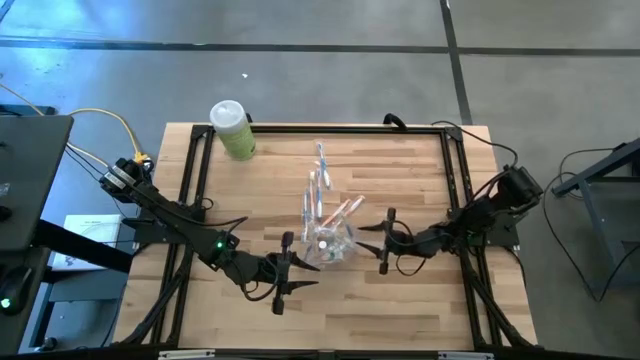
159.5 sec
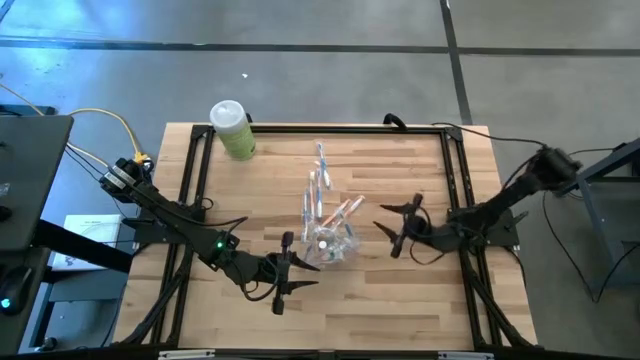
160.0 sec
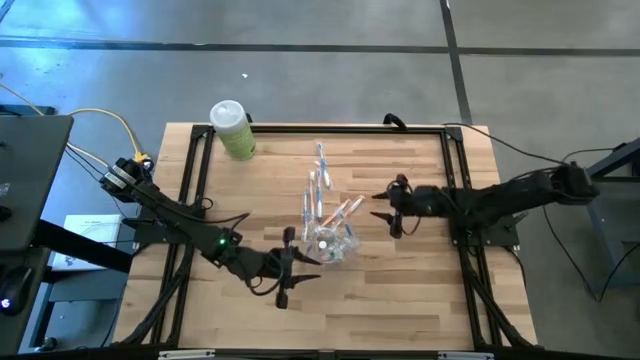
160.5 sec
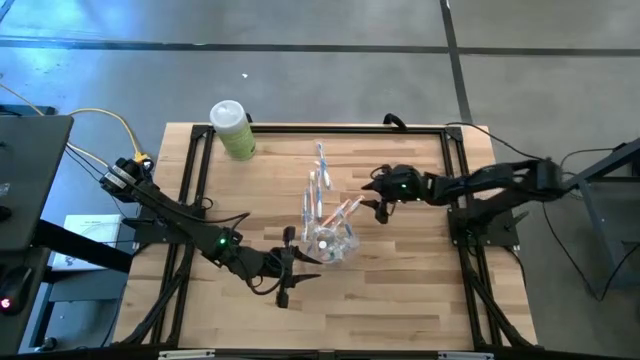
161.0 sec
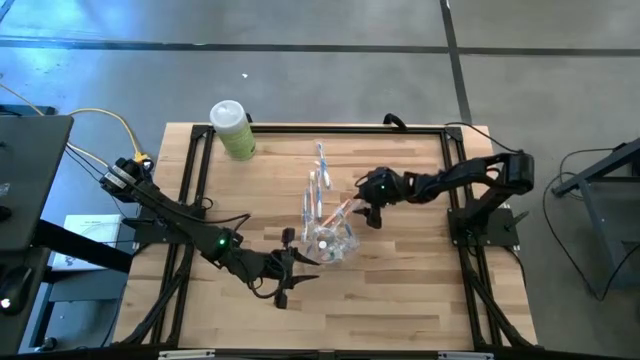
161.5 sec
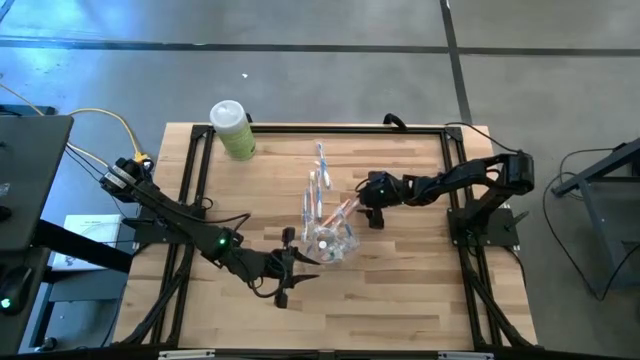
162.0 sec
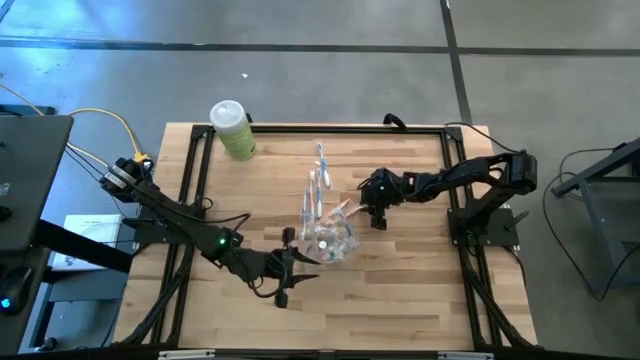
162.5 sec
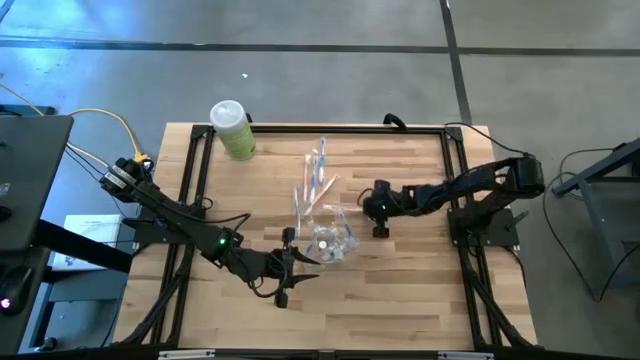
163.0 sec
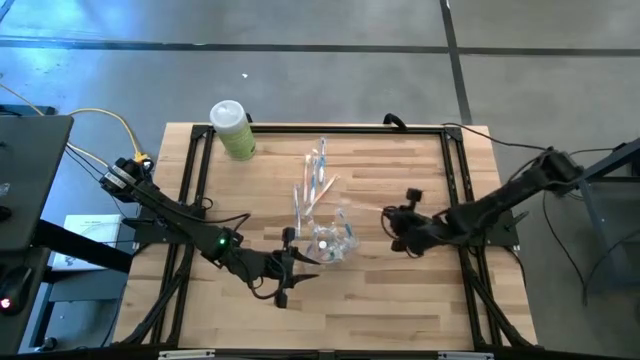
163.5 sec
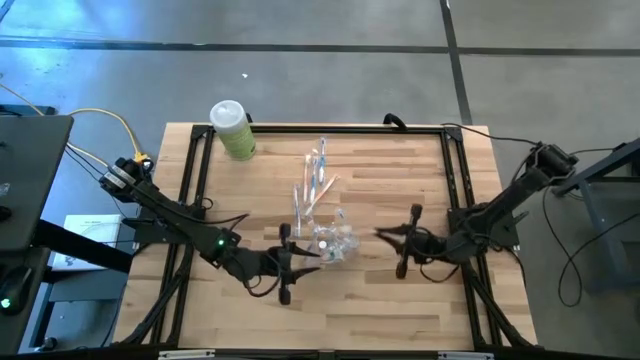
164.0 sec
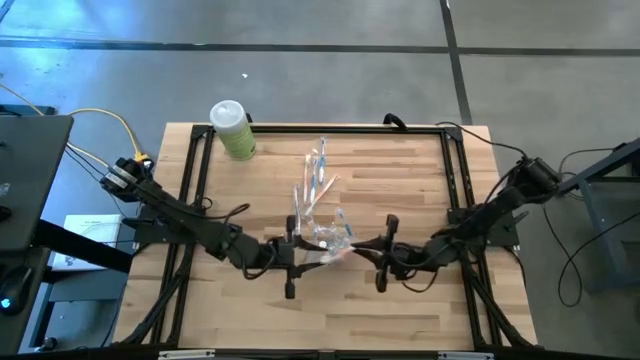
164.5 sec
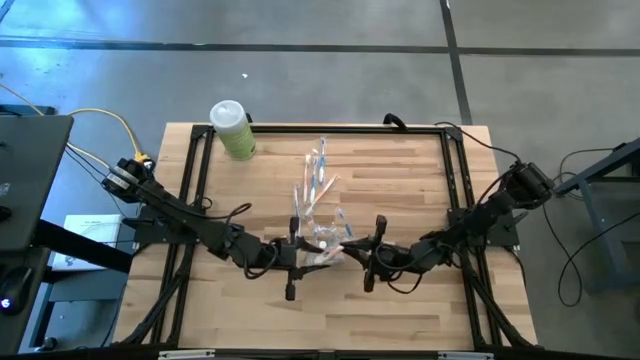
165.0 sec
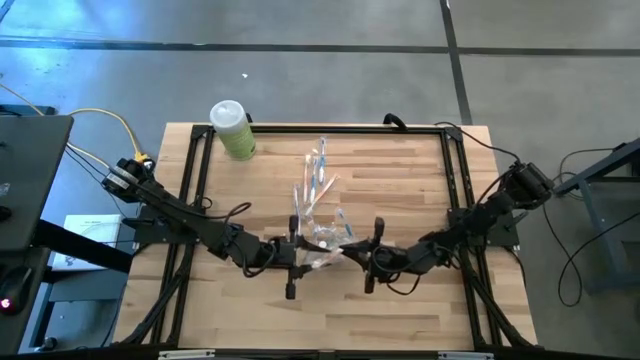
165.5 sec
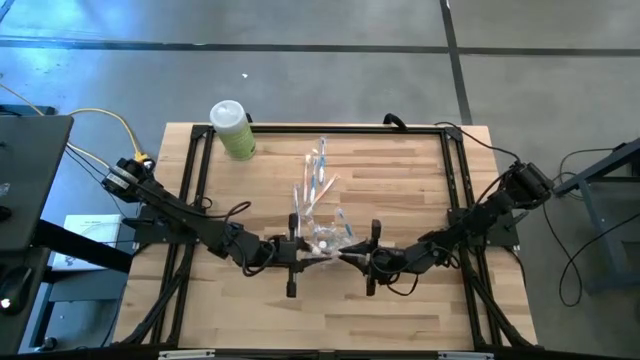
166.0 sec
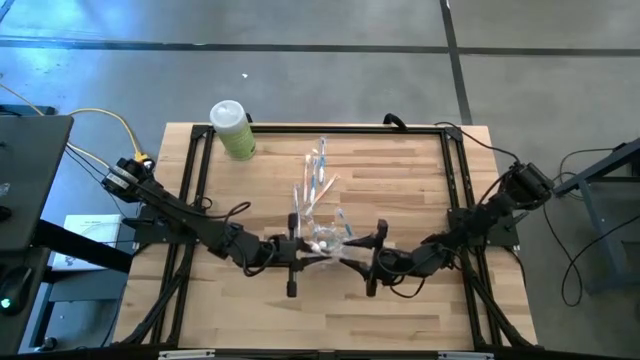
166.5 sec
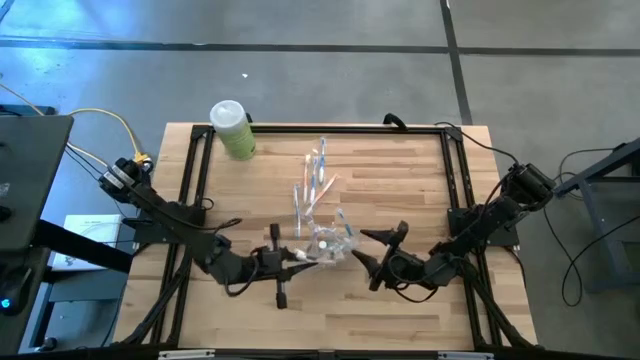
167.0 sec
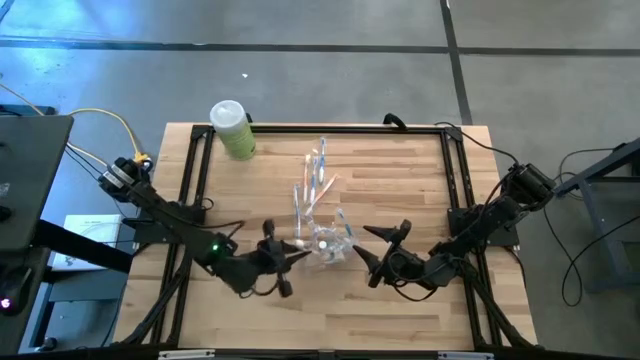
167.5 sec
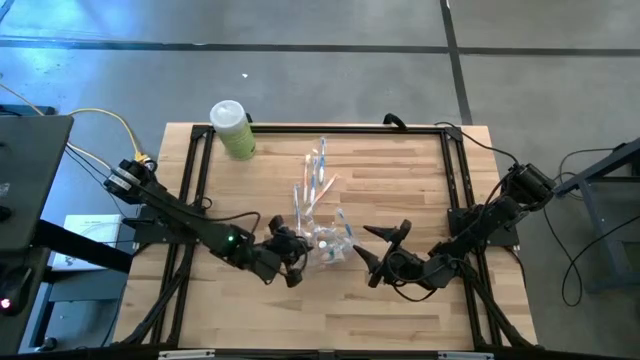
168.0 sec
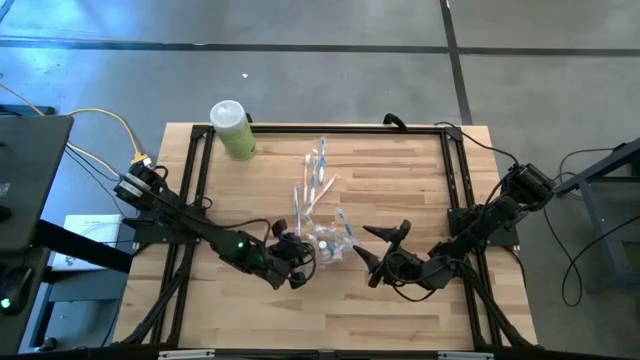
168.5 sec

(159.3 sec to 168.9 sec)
Task: Pick & Place toothbrushing station
Put the orange toothbrush into the transparent organizer

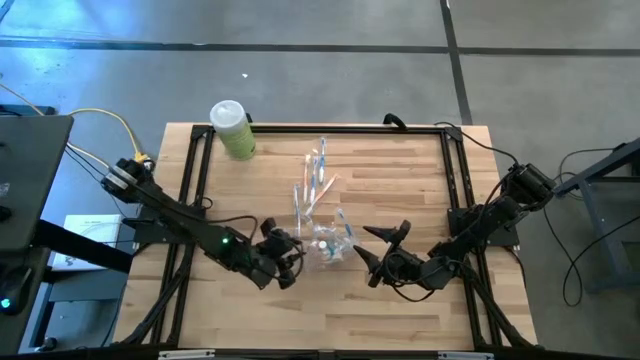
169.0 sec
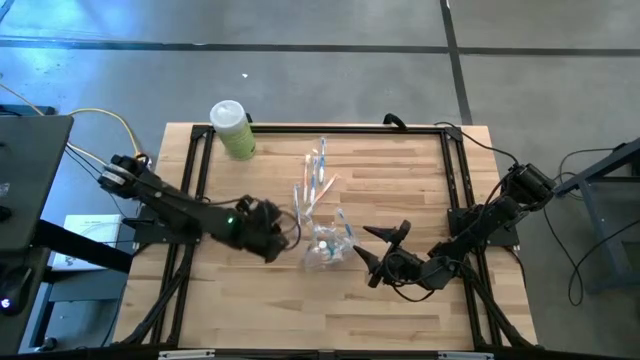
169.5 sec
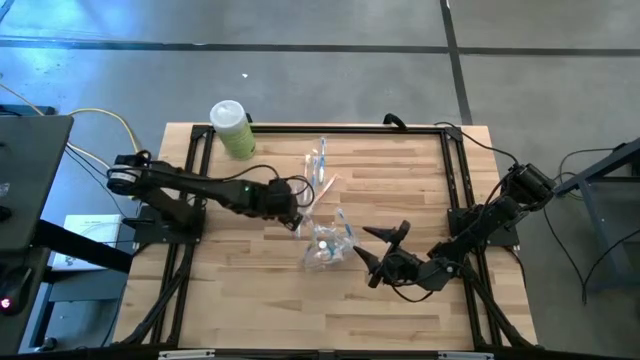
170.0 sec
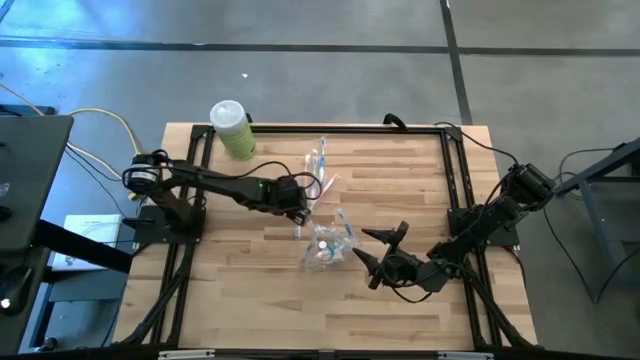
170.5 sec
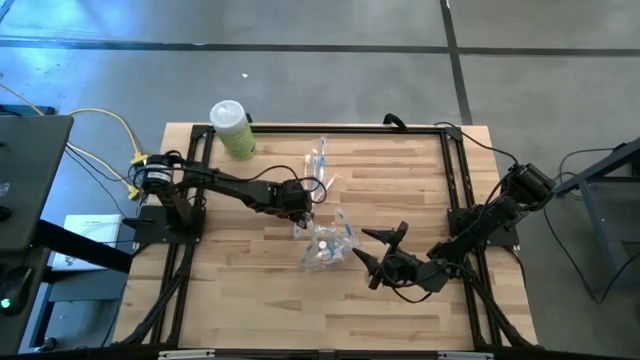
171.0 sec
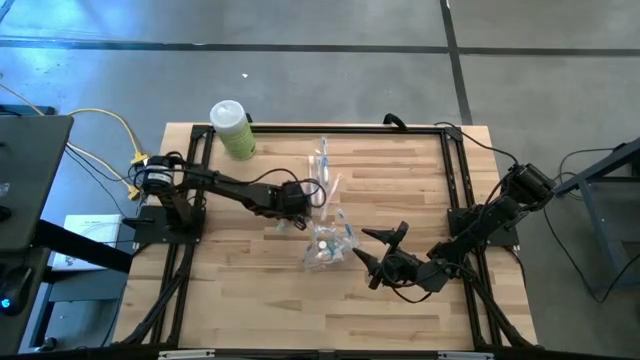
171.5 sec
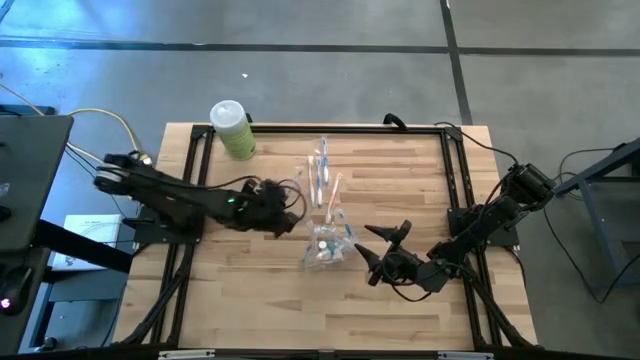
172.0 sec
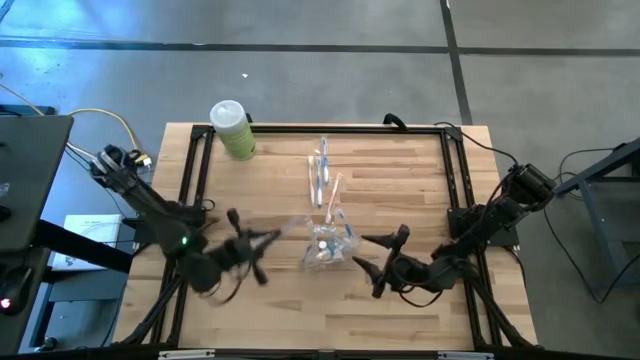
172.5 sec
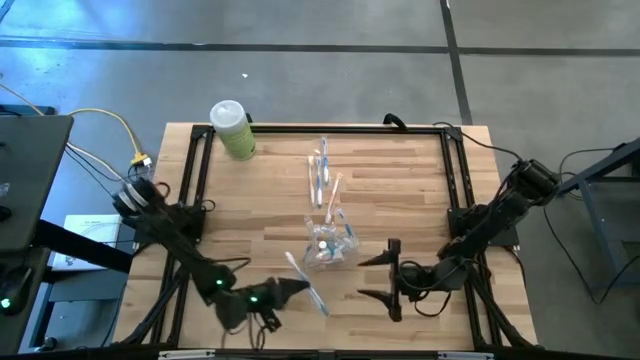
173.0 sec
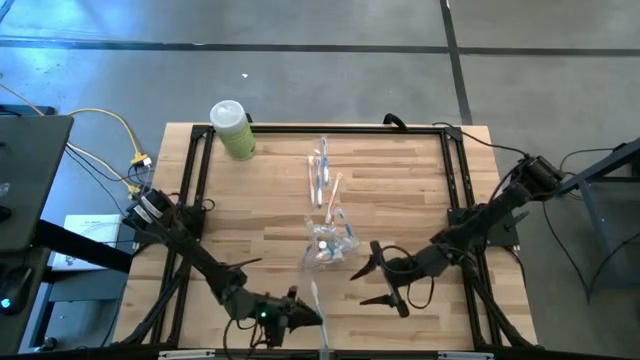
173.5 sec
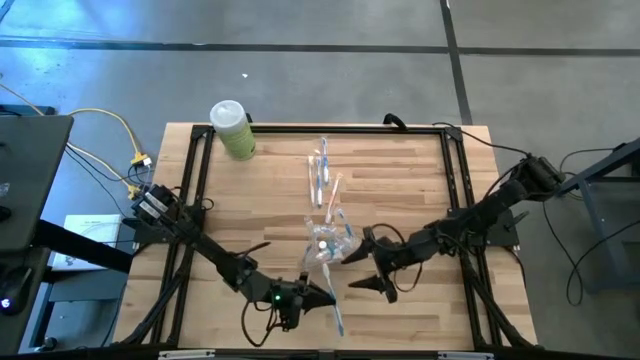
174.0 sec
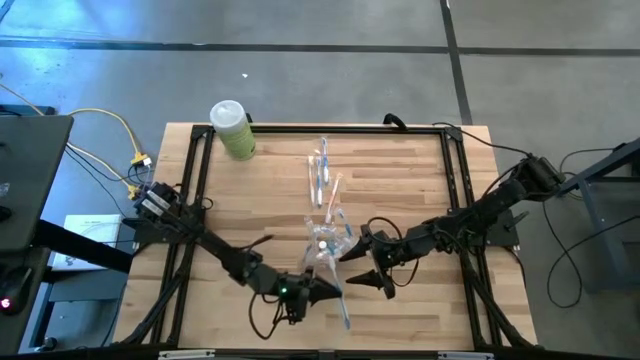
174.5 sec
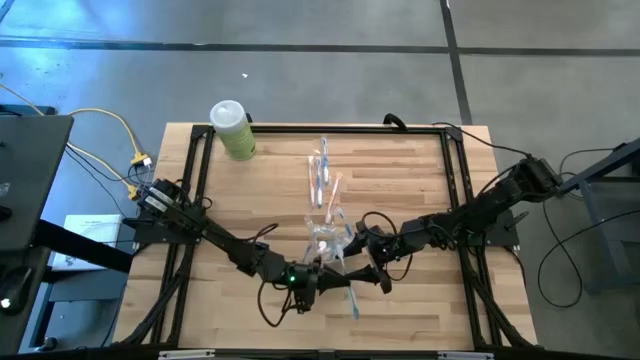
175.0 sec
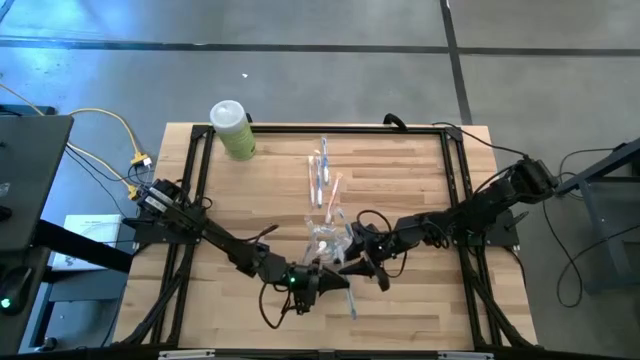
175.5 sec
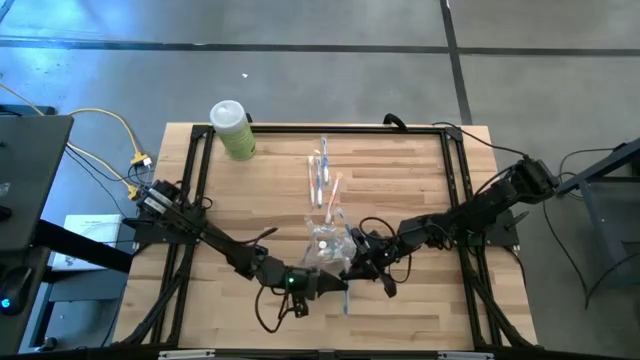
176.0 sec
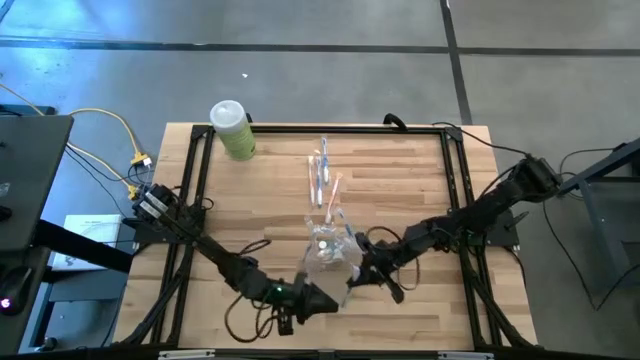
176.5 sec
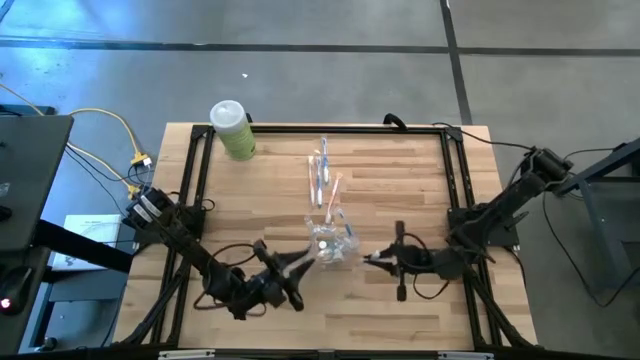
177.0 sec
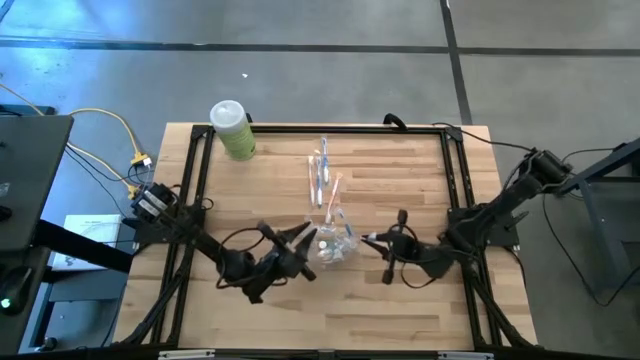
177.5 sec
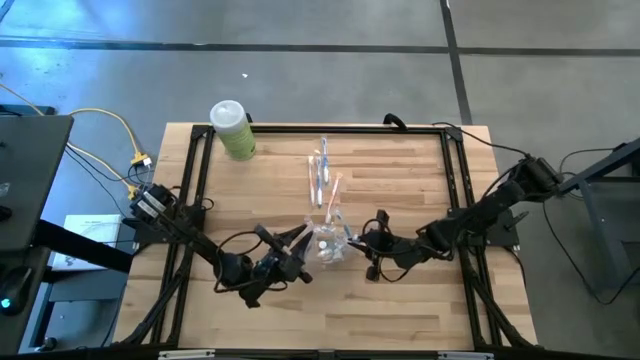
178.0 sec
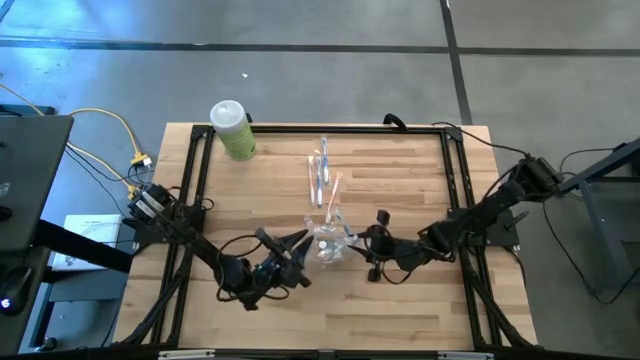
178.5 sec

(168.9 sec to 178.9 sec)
Put the blue toothbrush into the transparent organizer

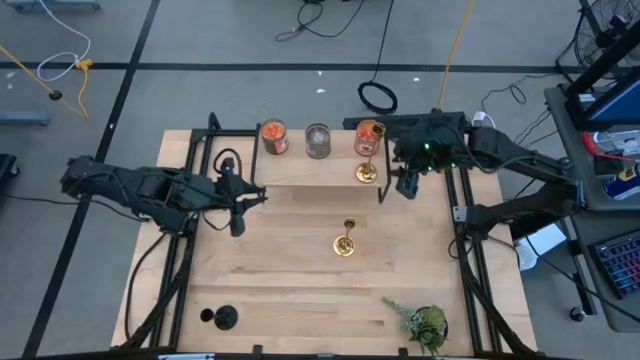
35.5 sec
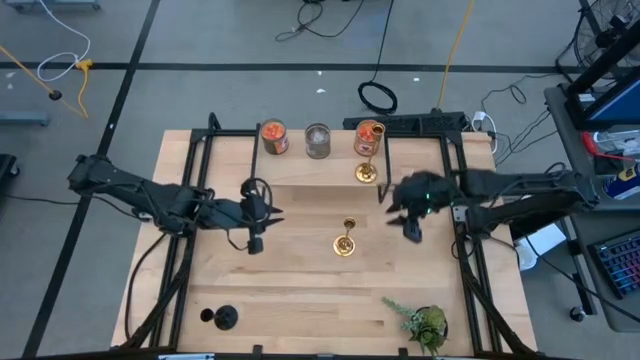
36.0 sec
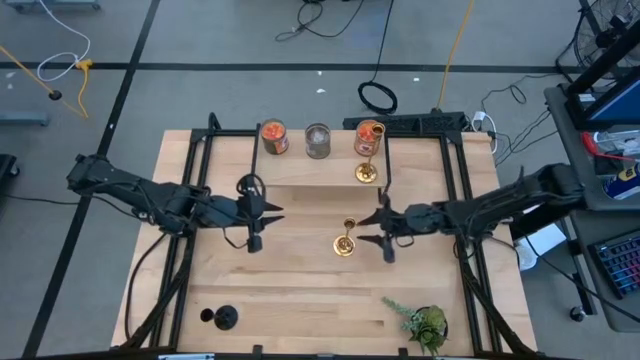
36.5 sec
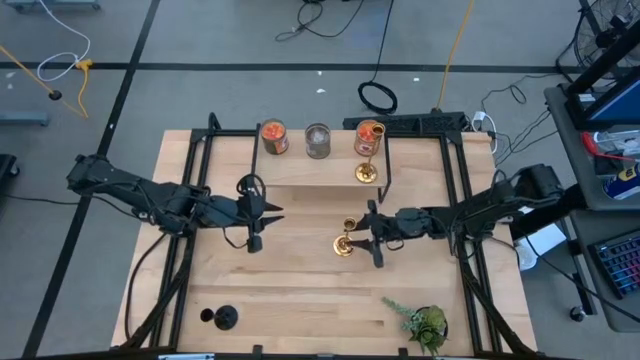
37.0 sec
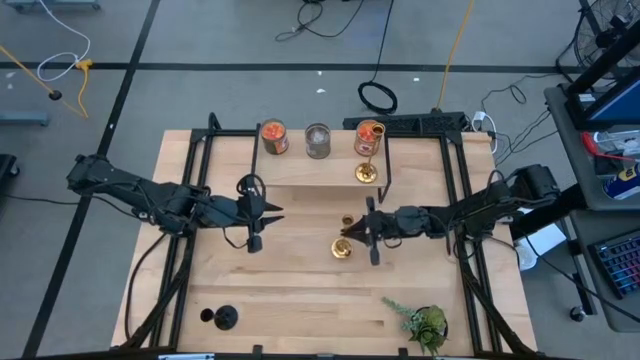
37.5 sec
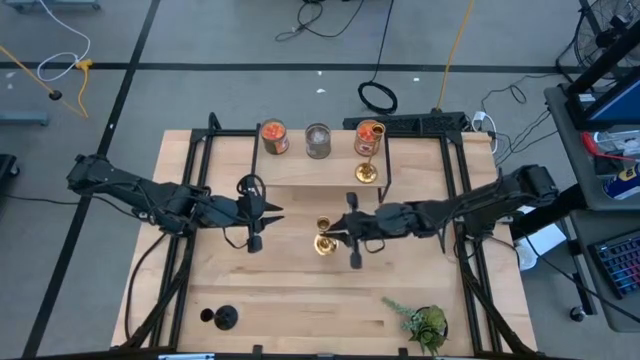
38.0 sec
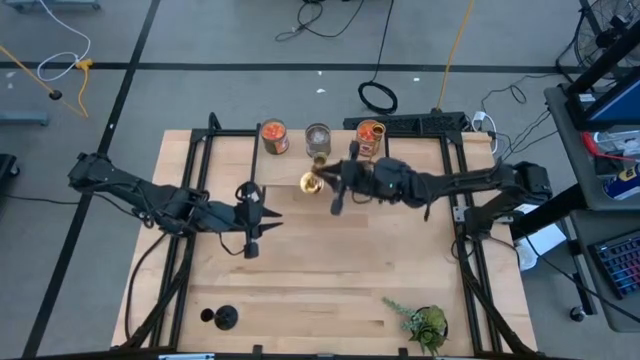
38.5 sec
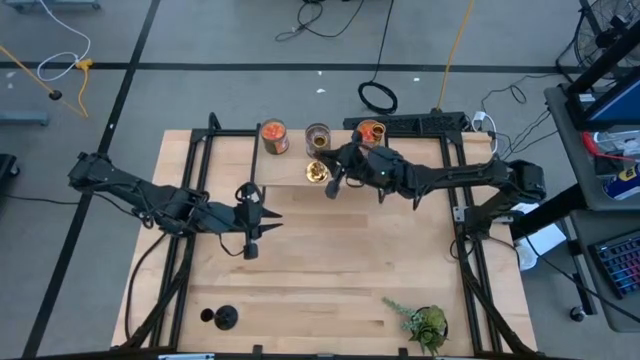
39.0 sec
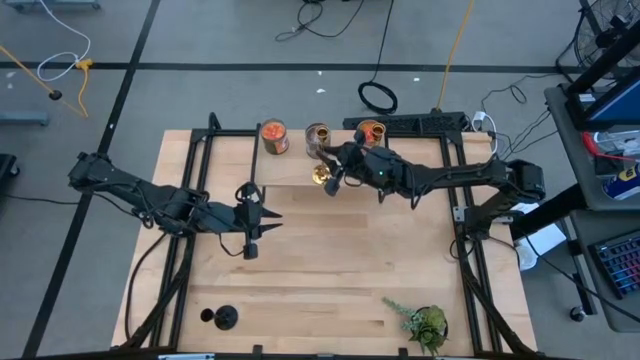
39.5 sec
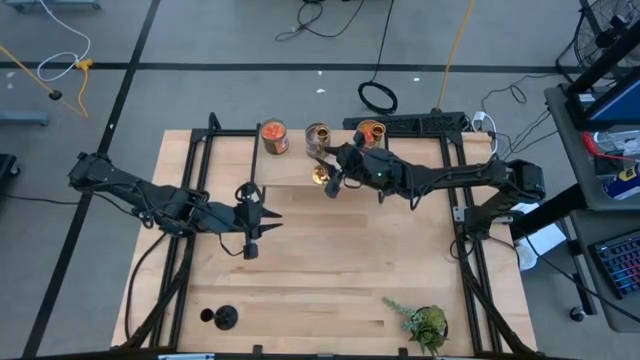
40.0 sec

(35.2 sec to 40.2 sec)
Task: Pick & Place candle stick holders
Put the brown candle holder on the shelf
